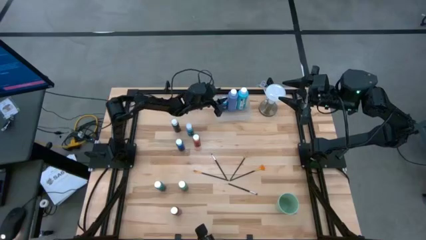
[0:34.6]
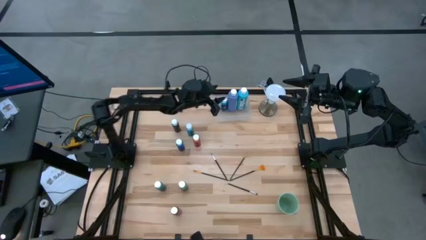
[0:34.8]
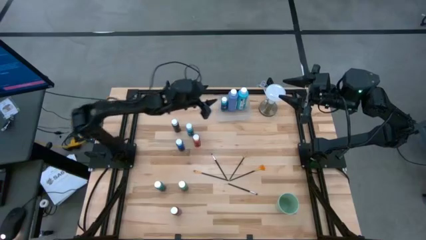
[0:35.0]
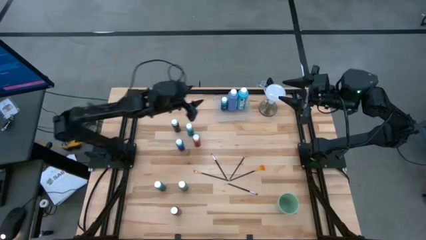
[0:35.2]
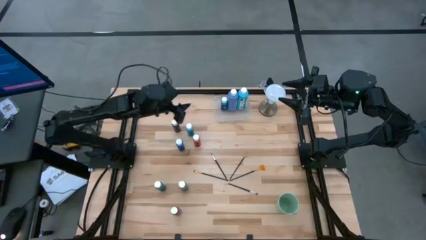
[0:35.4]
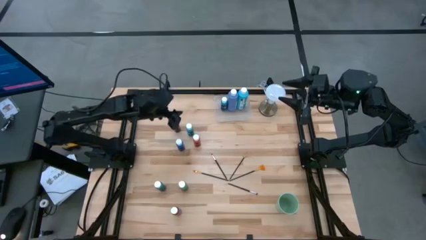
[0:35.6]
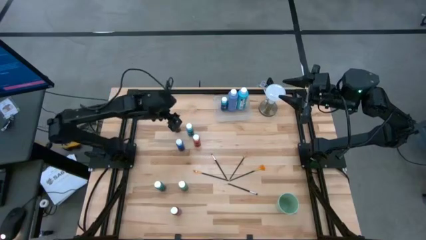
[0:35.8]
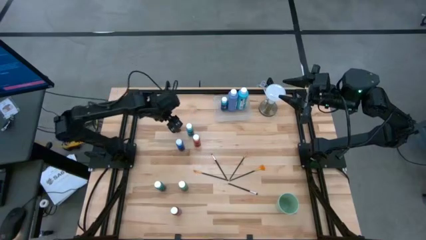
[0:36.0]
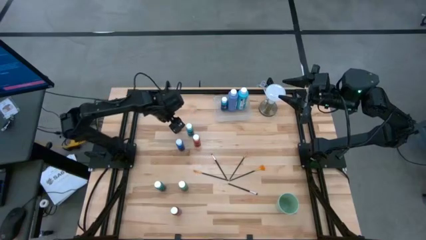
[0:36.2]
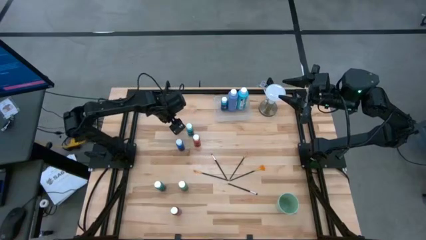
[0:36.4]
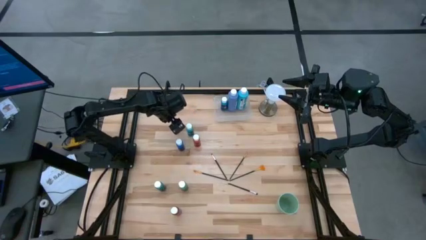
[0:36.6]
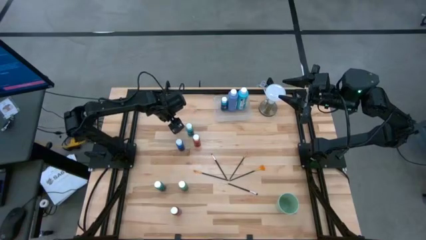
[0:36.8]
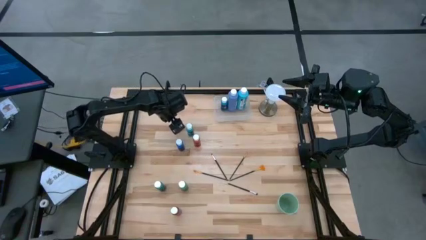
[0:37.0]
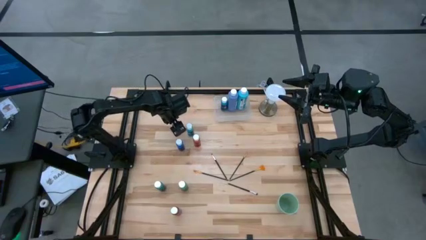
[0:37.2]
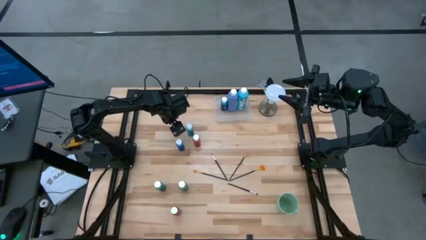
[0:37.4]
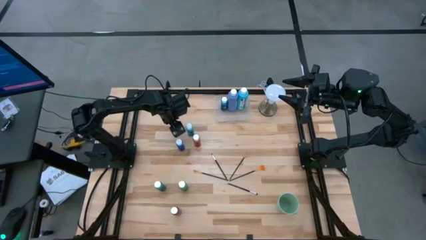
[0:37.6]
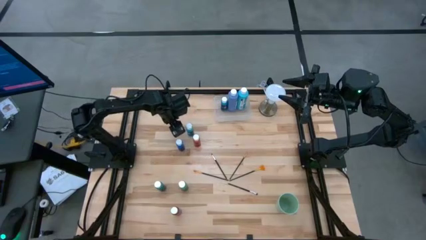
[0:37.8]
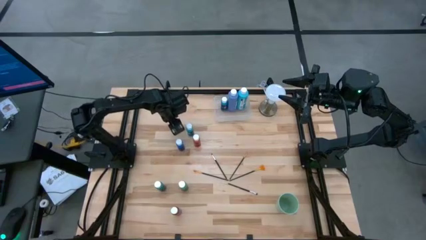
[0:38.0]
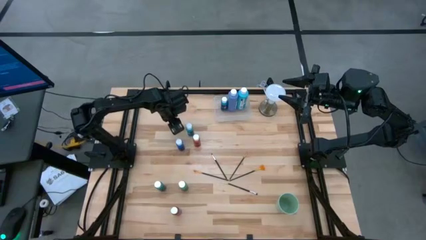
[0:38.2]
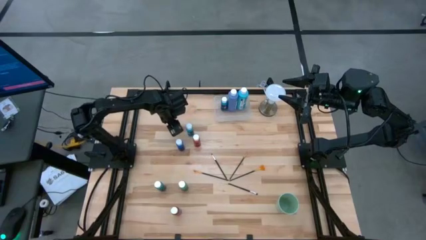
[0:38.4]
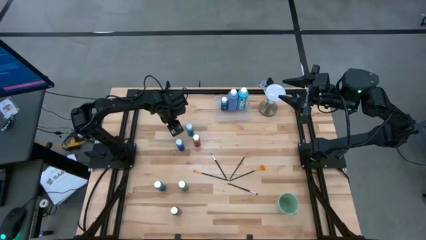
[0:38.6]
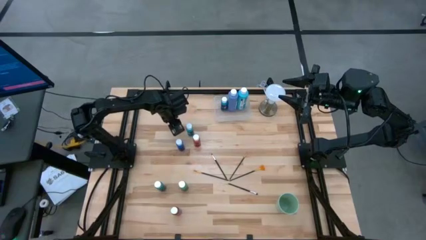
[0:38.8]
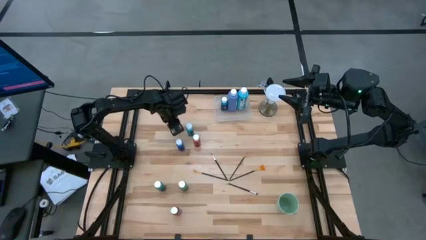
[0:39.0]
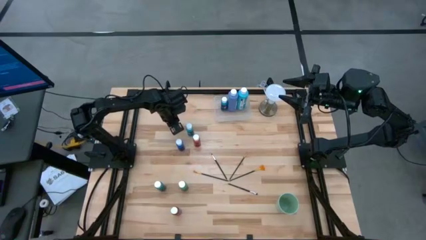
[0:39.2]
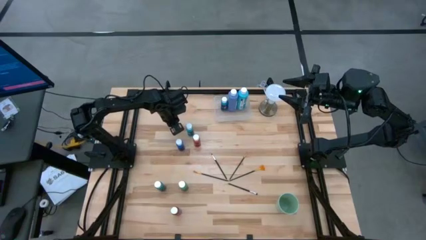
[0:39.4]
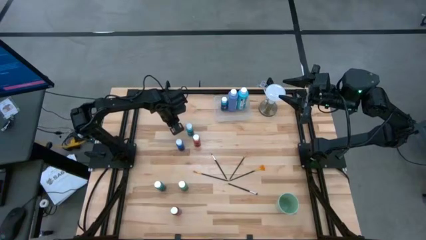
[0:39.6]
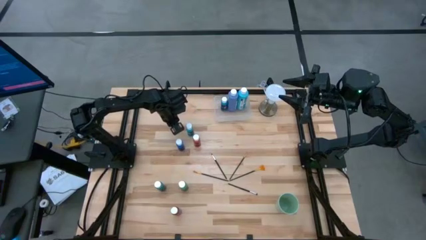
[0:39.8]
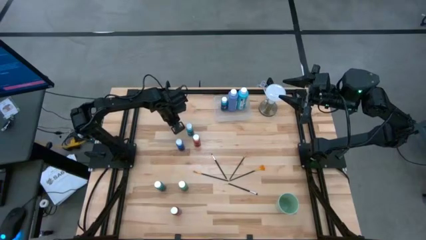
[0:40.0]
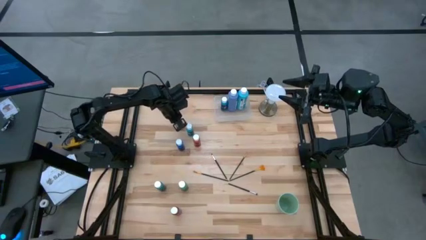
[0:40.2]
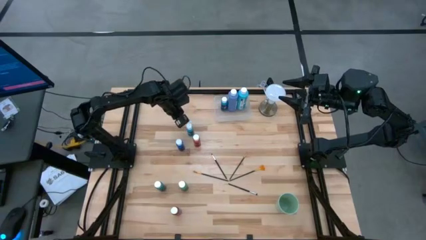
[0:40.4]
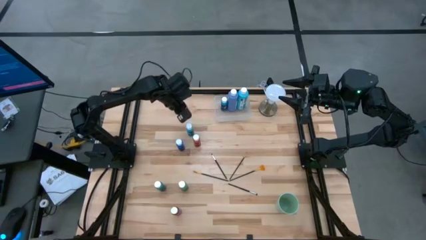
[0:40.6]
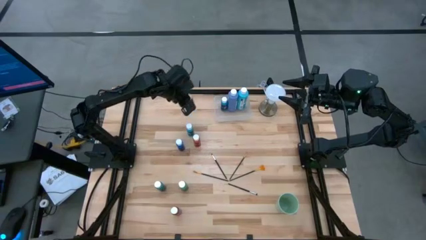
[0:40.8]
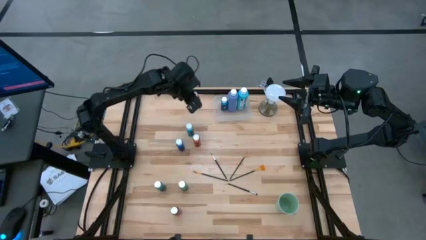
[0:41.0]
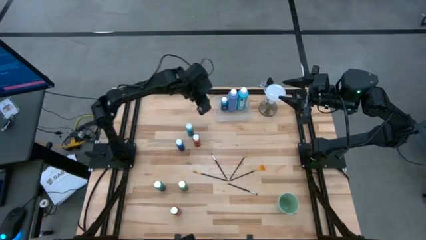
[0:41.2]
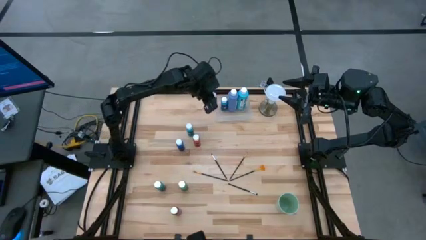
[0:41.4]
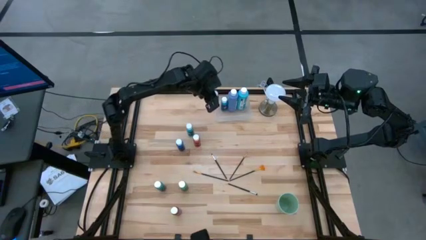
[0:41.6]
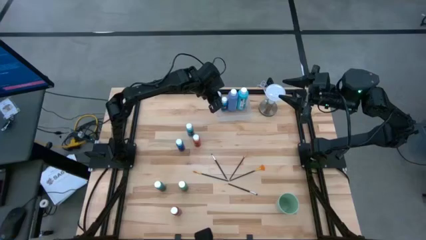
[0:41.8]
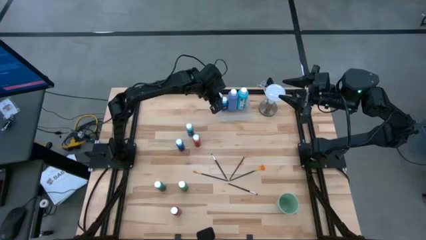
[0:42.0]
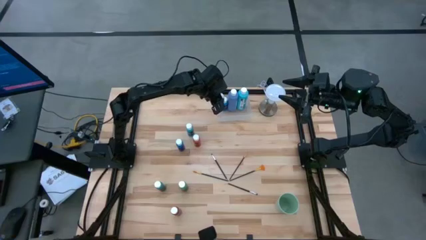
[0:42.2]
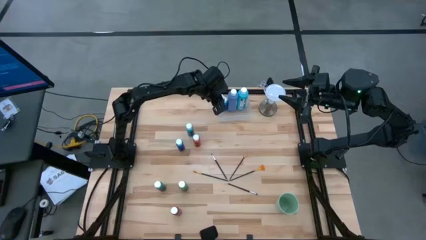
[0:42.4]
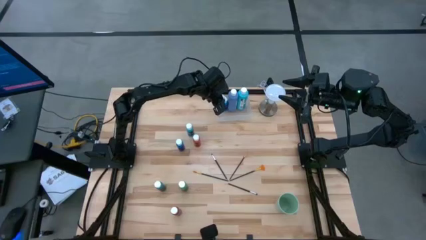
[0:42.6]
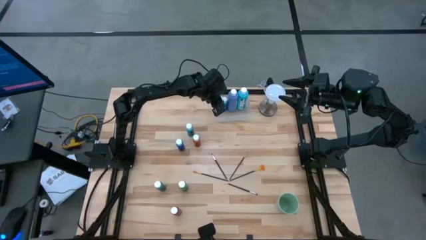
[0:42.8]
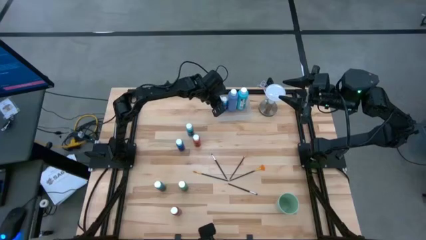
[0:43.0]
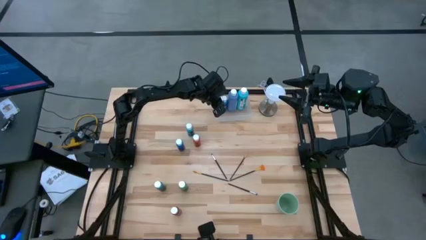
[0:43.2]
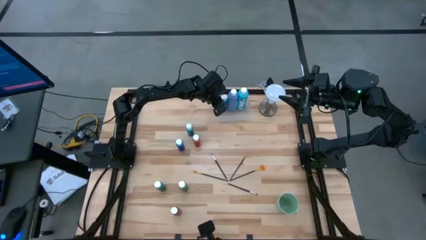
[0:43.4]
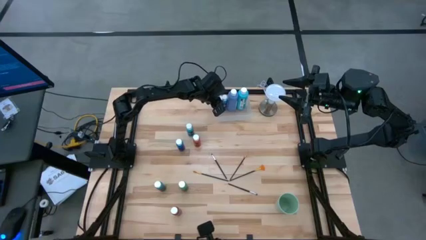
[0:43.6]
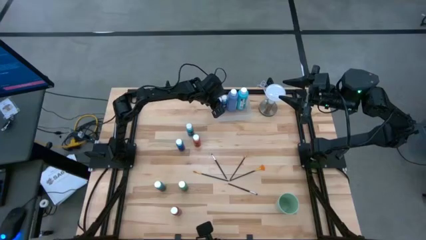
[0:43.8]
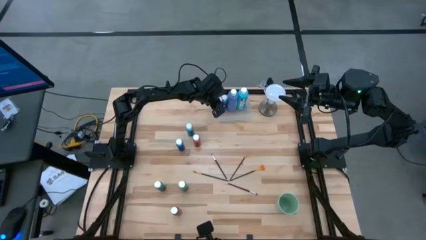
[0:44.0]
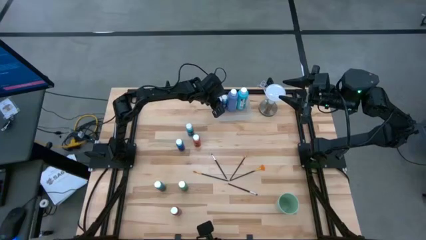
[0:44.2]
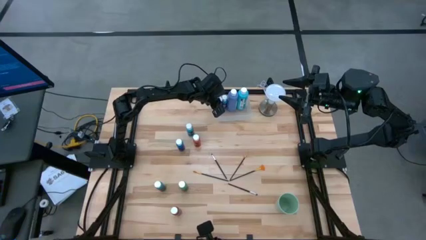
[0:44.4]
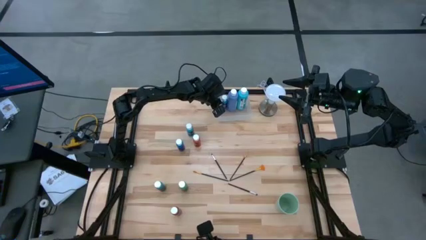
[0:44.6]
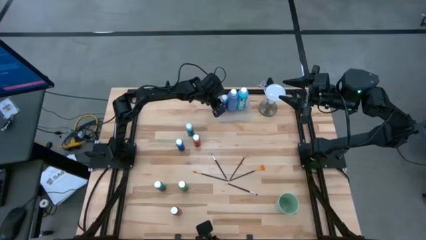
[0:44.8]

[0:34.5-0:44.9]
Task: Pick & Place Paint Supplies
Put the black paint bottle into the transparent bin
